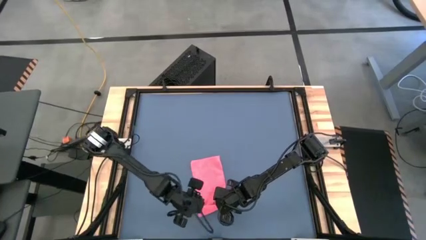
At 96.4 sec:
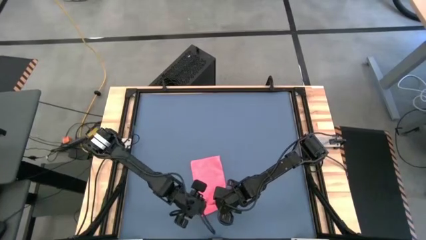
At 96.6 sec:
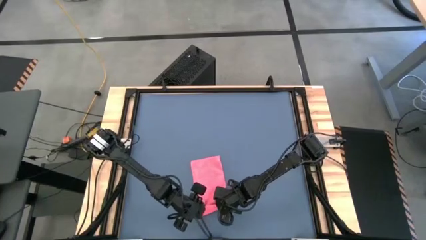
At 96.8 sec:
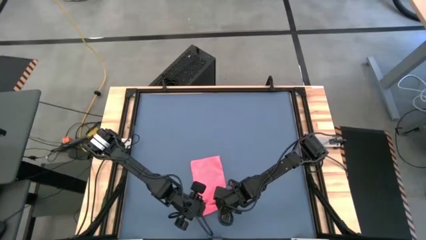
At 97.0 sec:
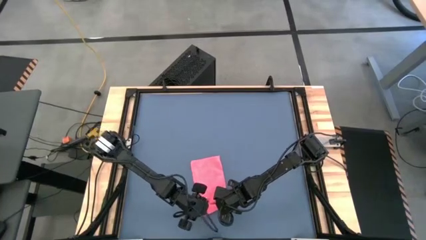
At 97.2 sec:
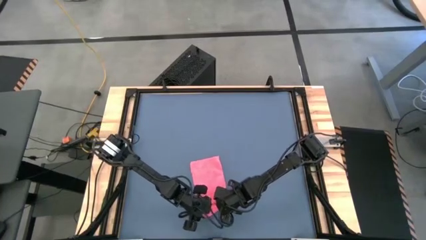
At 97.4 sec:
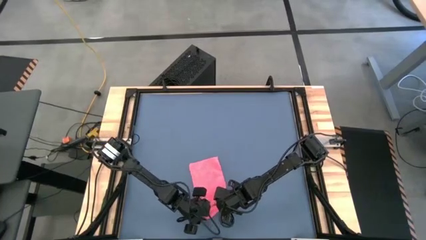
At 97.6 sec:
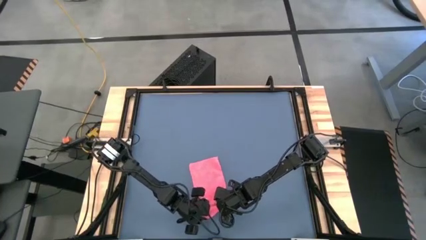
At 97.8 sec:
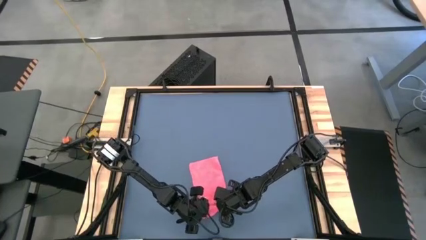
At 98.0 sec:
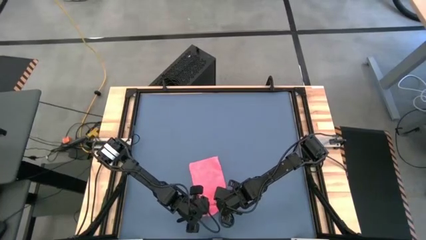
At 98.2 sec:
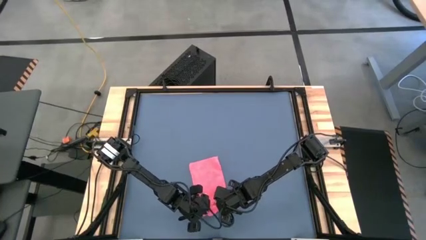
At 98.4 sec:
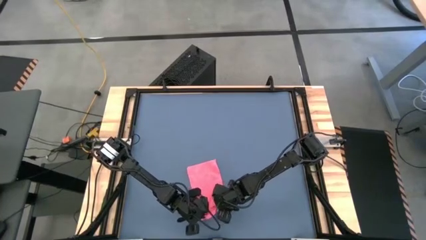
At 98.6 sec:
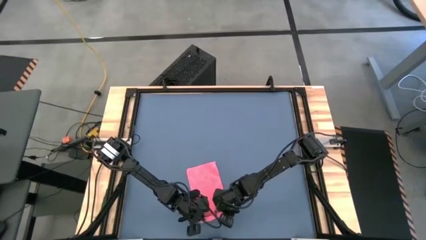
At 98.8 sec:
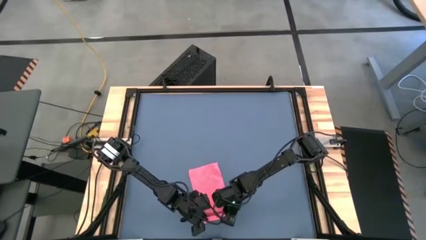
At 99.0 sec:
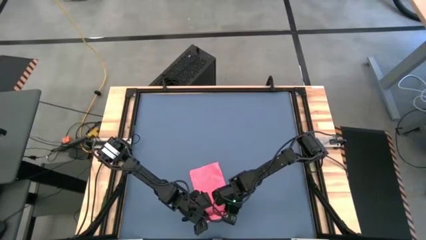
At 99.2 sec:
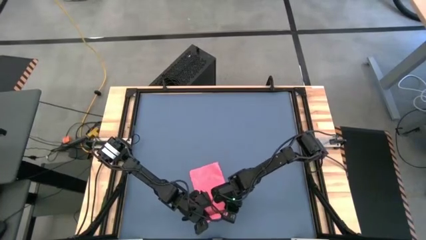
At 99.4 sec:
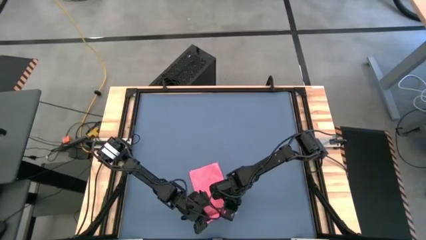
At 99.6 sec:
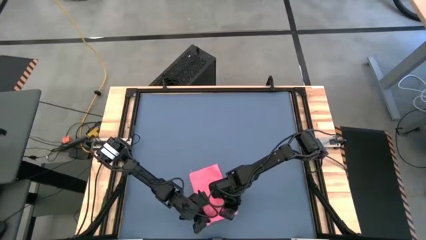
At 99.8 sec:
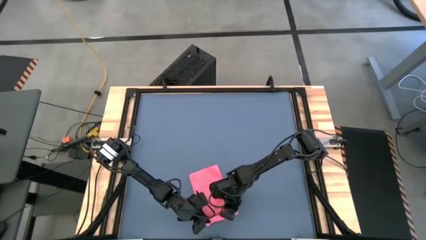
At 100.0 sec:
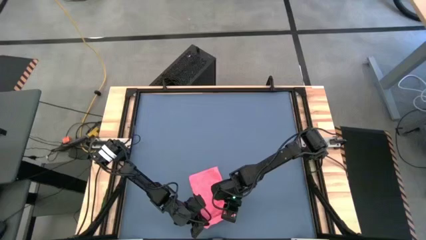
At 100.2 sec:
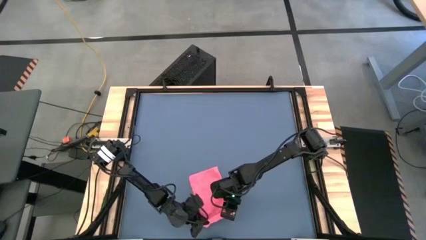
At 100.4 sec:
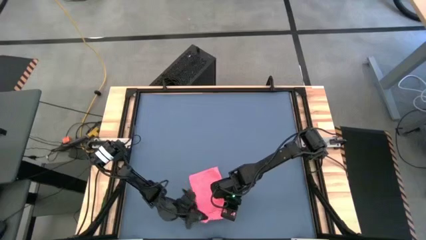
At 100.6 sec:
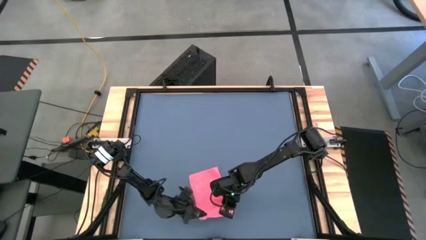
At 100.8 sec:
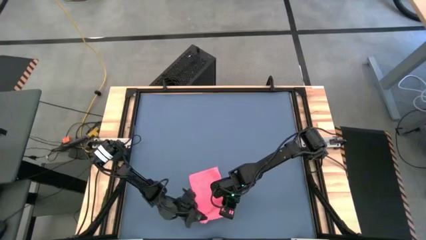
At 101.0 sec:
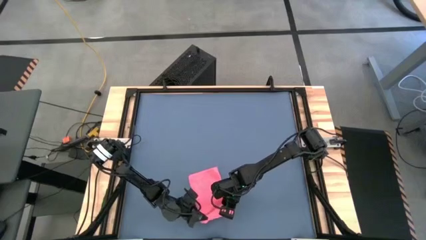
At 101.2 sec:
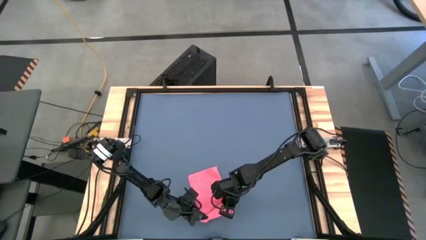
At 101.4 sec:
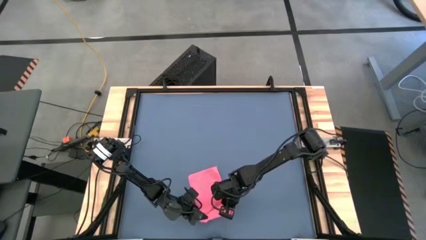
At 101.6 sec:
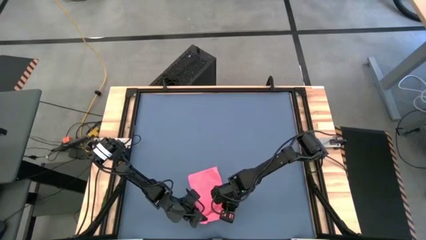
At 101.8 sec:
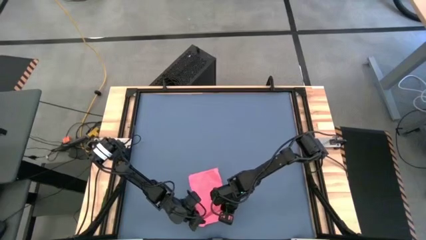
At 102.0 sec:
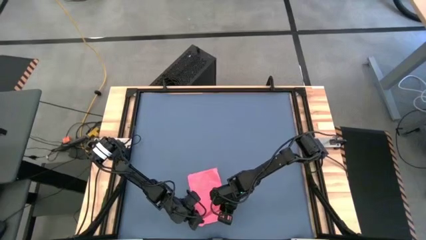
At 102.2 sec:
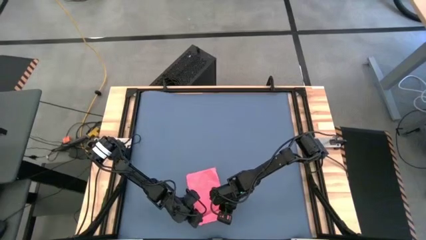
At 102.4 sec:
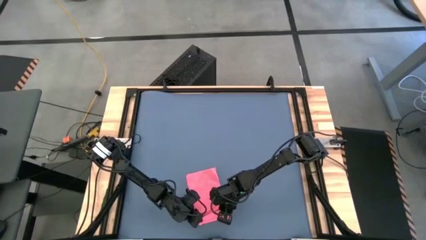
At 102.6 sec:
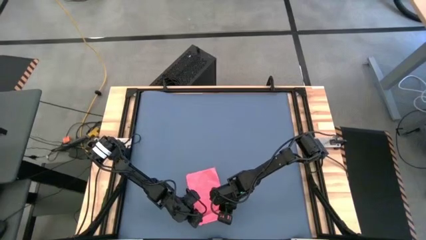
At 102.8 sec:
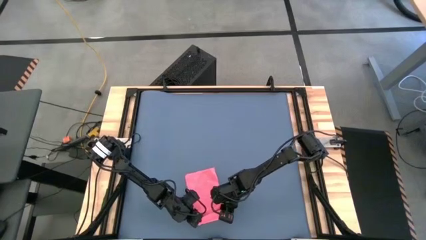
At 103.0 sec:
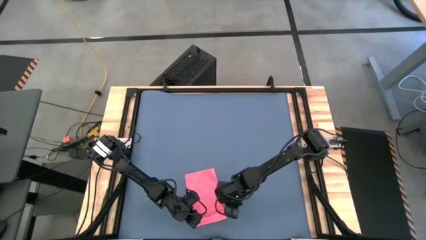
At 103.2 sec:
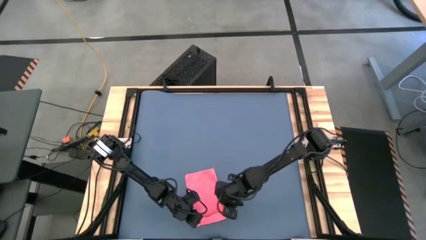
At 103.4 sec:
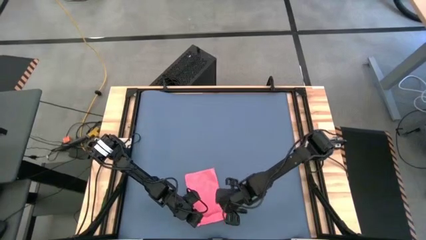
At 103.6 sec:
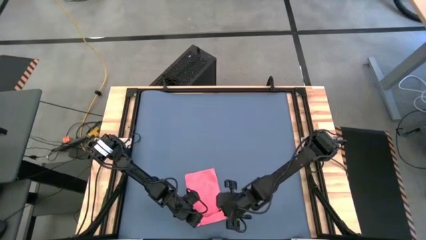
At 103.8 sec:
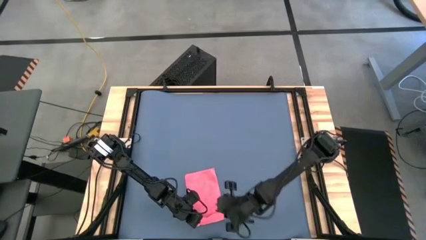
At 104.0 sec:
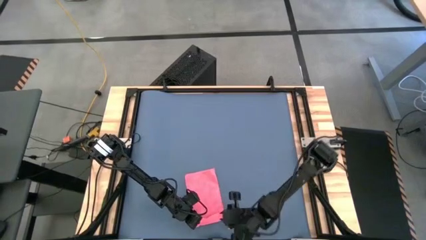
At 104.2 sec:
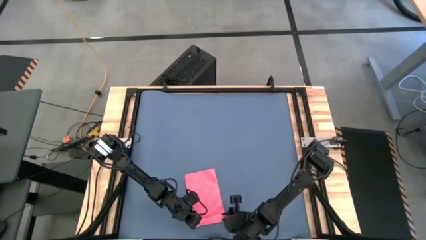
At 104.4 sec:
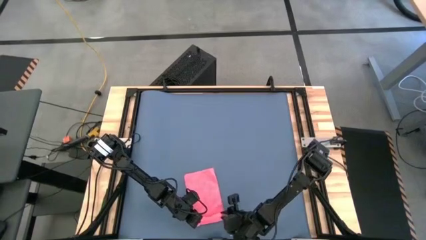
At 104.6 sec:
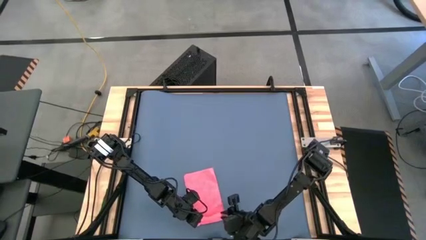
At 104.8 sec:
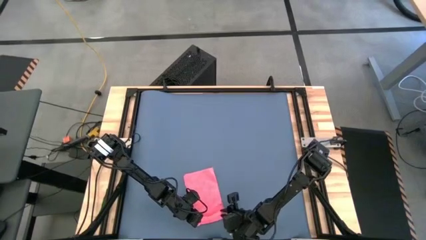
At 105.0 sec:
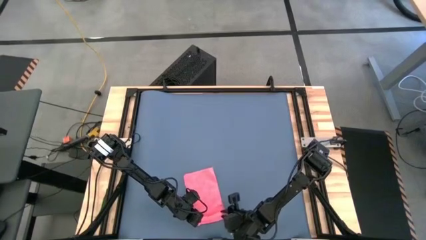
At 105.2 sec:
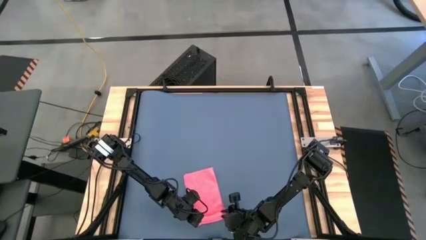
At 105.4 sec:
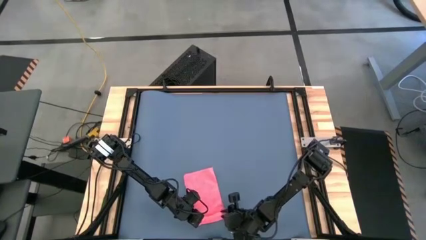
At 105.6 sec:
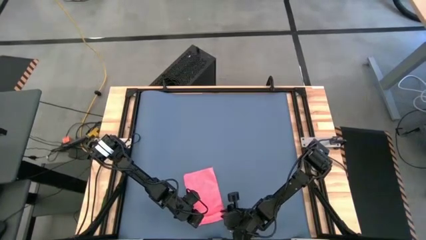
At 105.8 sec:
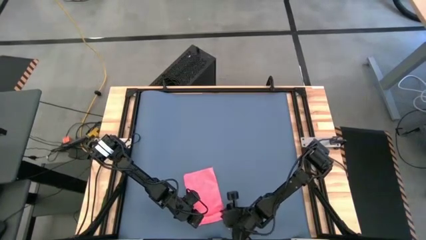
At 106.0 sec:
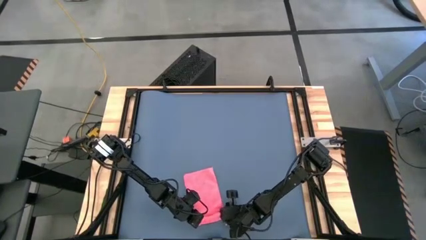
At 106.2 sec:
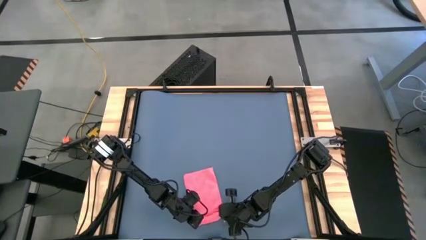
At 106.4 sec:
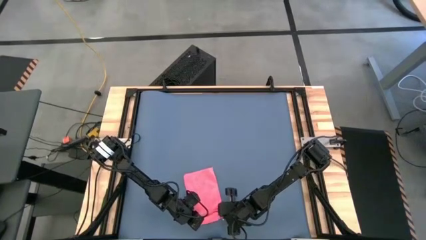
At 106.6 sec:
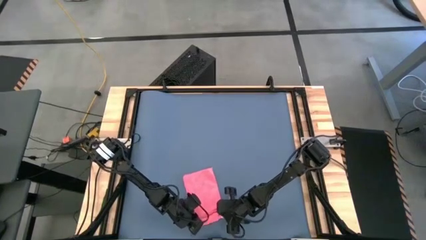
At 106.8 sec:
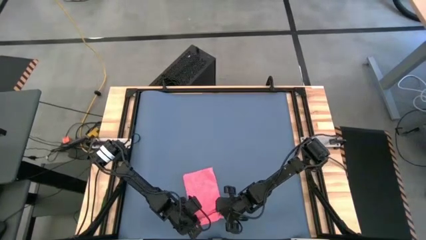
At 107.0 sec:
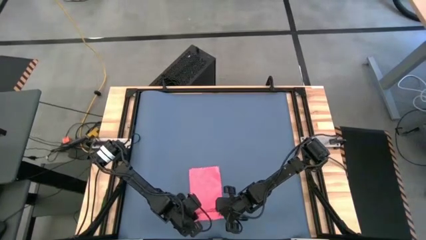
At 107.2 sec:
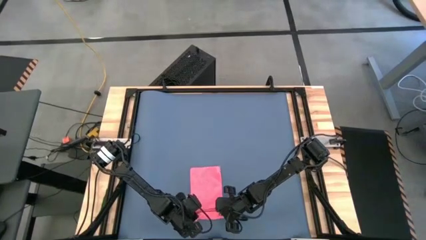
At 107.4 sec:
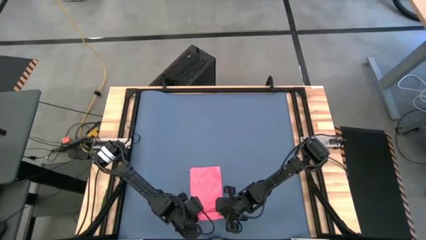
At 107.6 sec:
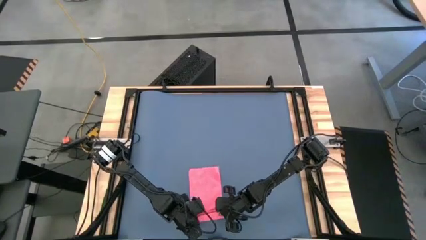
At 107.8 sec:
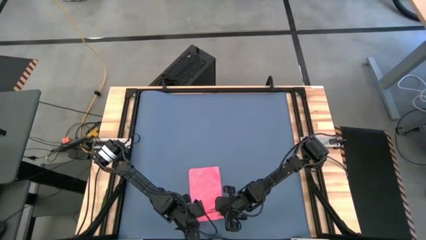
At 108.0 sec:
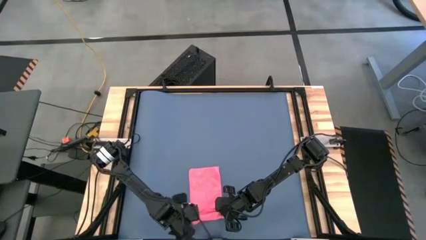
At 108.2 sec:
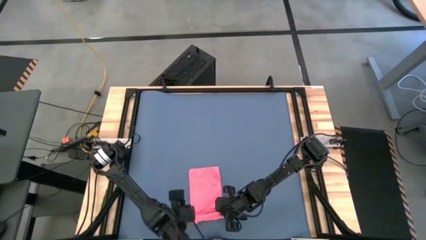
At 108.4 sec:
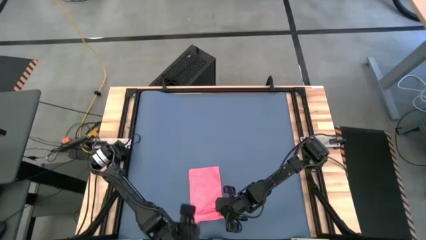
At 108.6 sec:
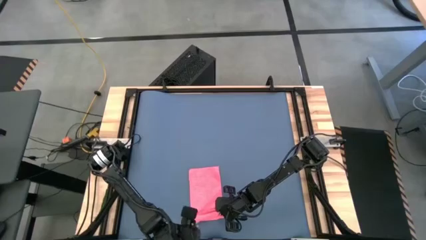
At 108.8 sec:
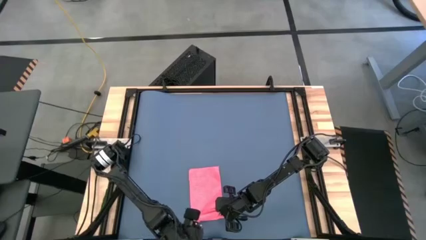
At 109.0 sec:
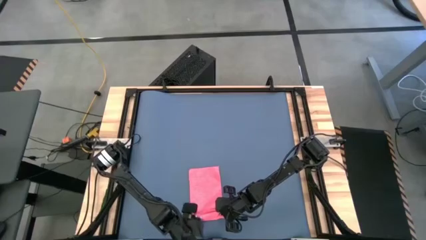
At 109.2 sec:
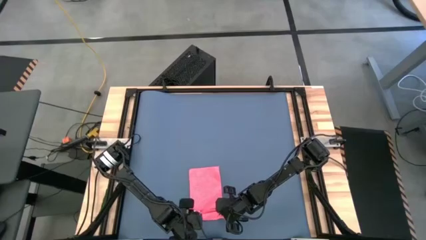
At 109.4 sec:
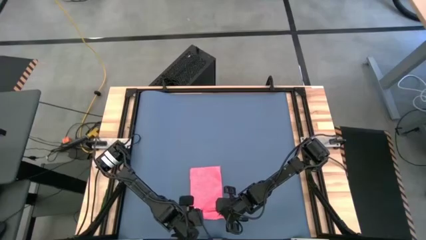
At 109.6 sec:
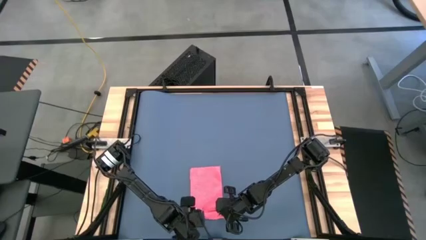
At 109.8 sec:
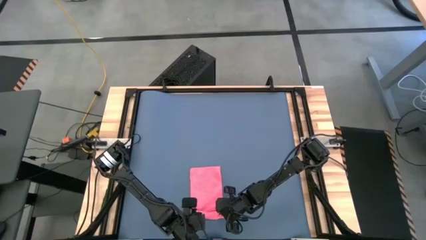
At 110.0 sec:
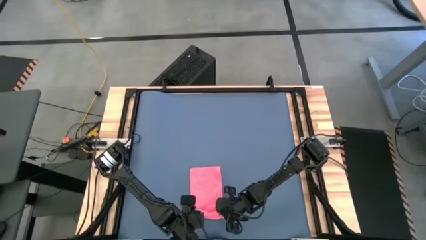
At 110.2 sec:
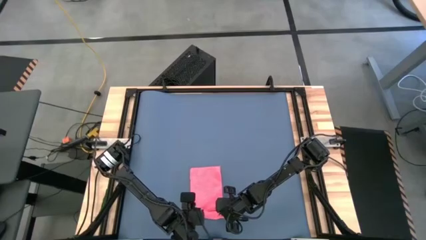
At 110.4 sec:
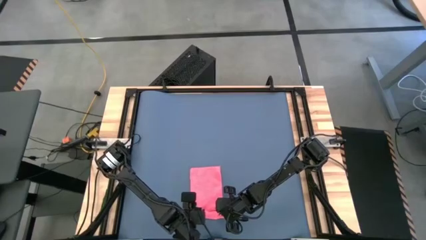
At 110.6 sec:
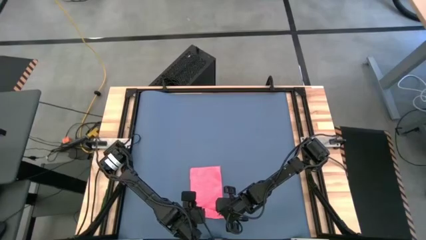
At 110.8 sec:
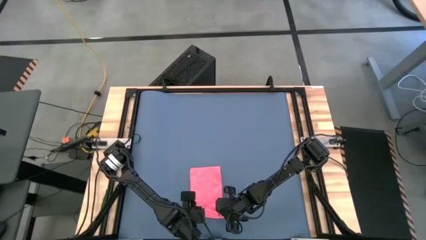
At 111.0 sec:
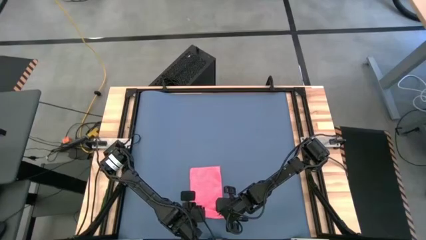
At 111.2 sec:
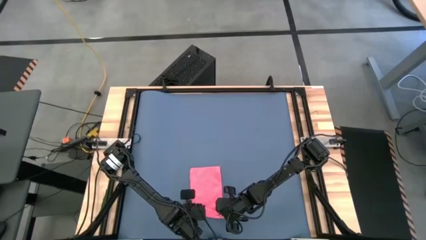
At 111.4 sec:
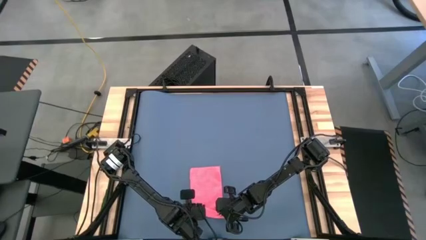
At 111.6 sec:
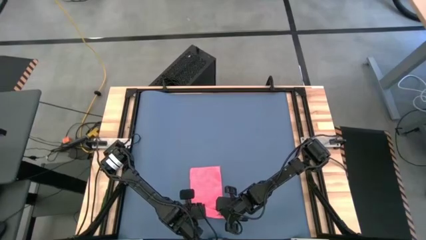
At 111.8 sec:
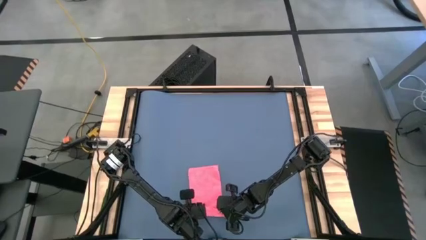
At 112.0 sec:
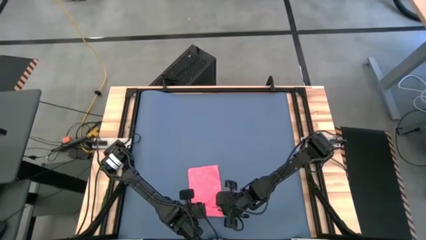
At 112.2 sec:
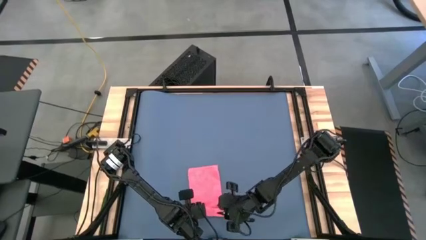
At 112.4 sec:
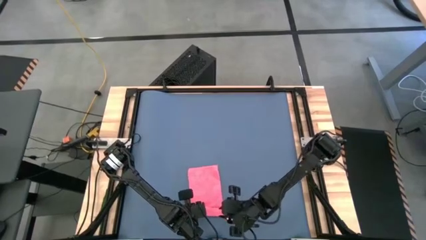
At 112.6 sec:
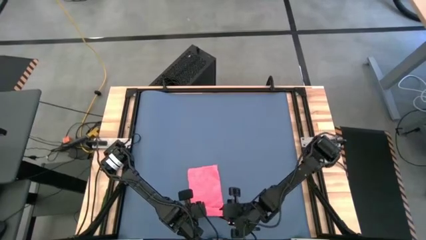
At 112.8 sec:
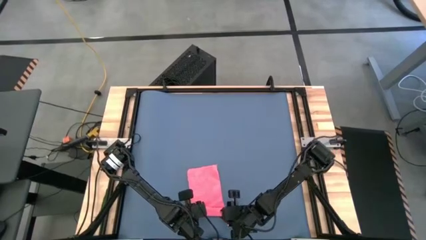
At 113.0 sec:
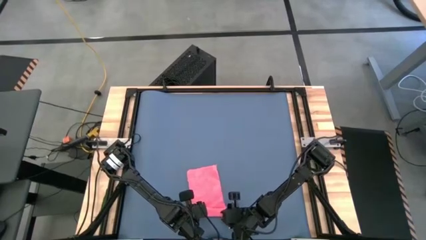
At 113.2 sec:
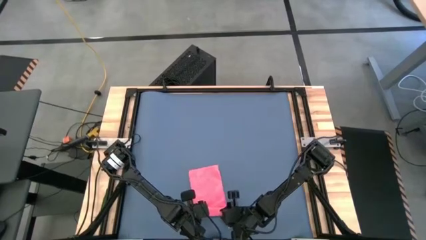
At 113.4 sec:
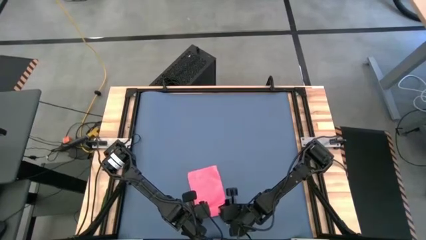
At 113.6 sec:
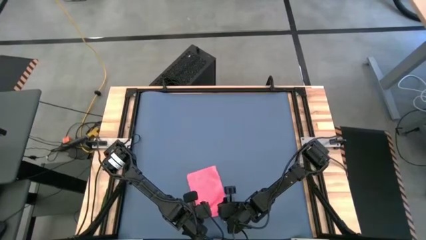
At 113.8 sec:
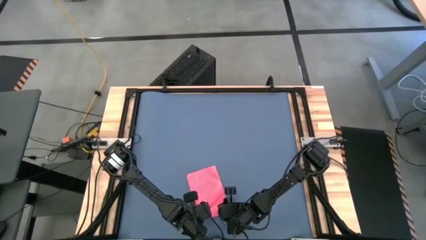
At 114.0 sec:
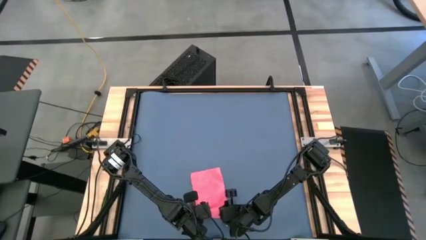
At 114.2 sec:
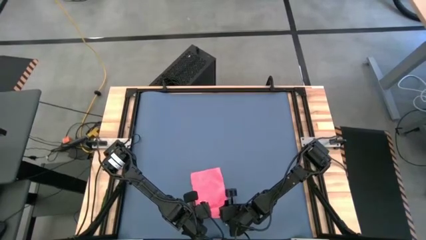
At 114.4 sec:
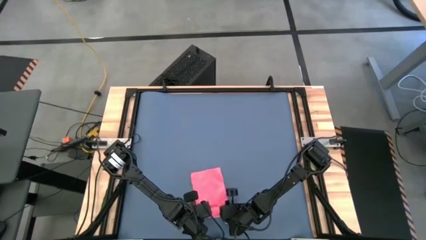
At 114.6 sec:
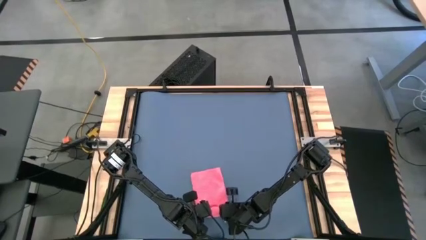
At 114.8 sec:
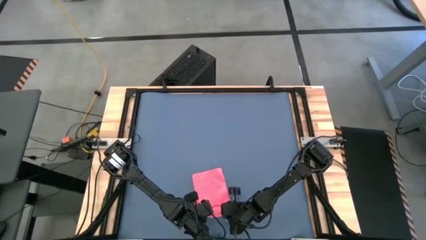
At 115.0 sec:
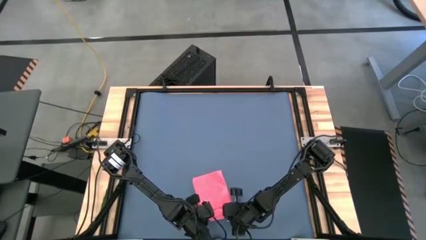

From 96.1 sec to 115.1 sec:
Task: Roll towel
Roll the pink towel
